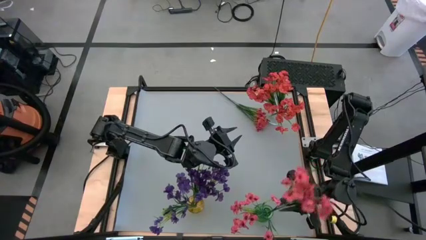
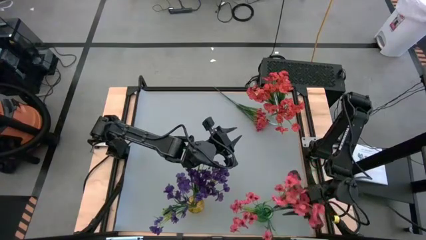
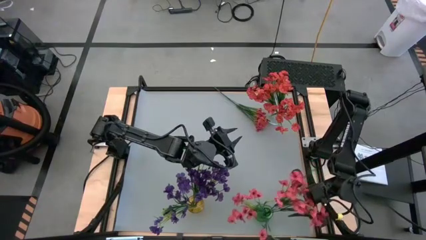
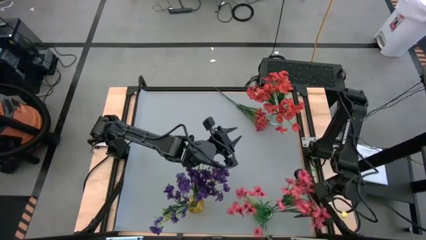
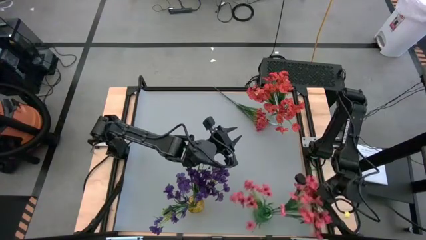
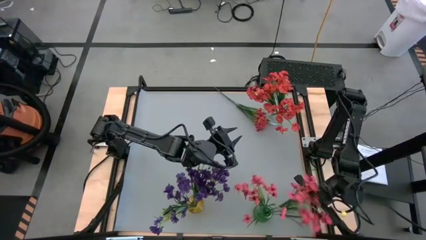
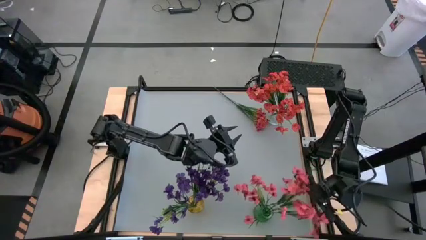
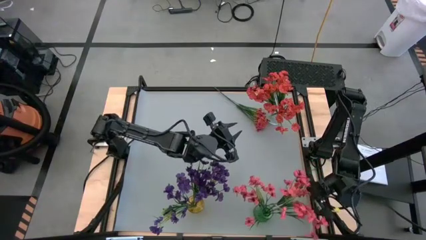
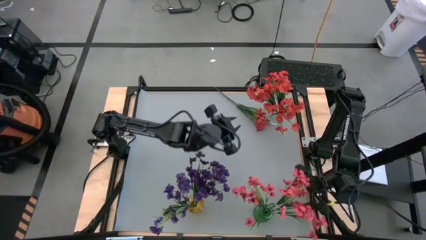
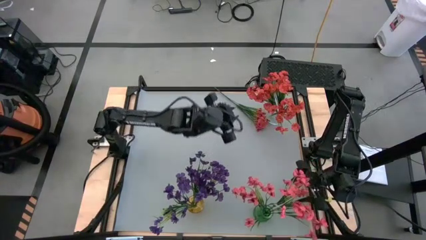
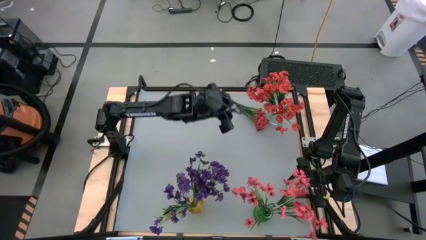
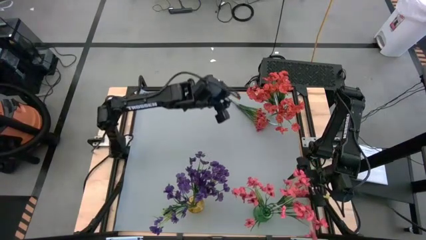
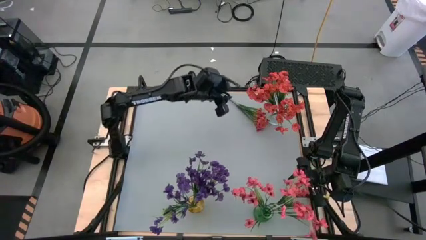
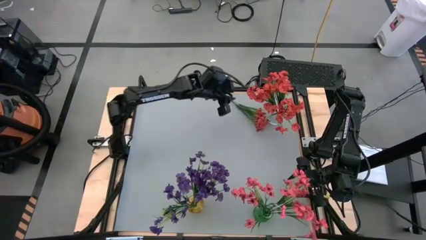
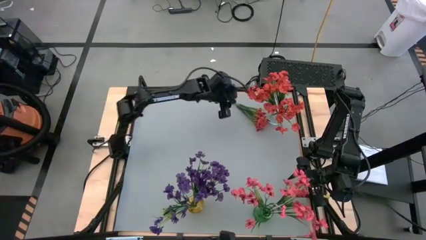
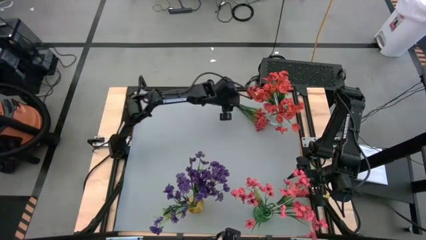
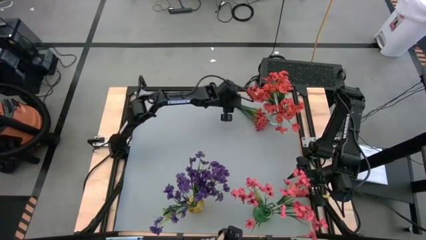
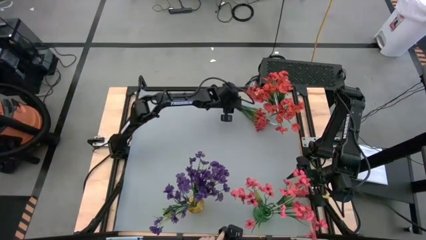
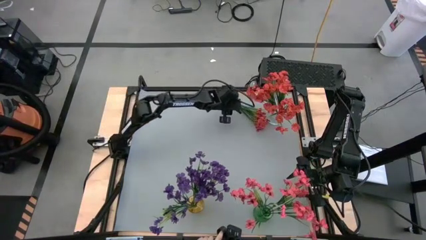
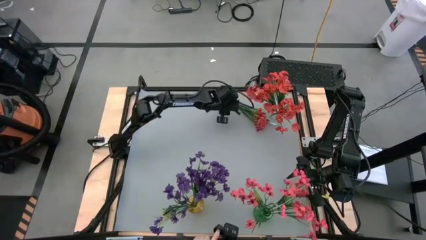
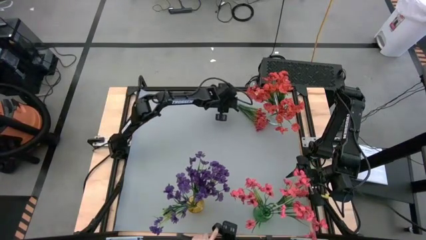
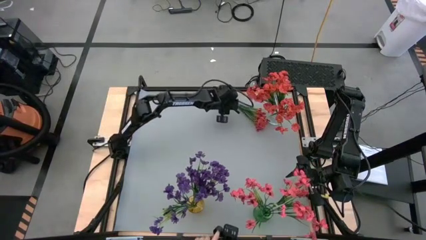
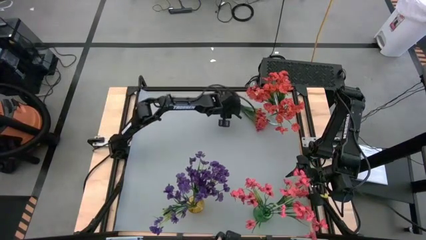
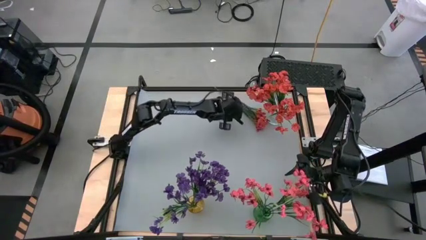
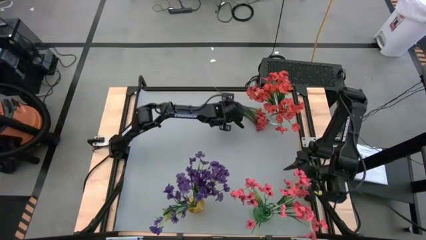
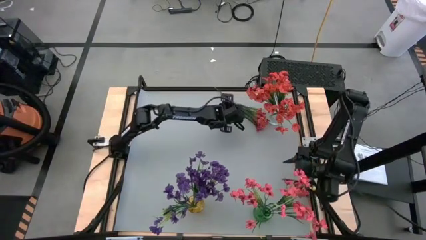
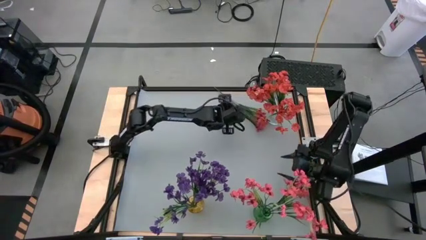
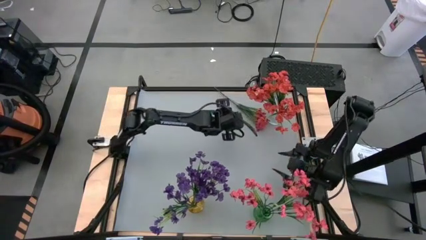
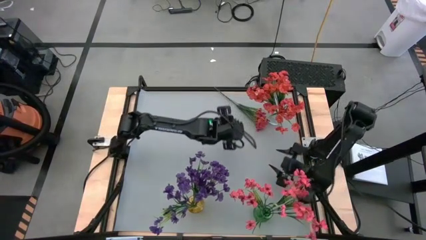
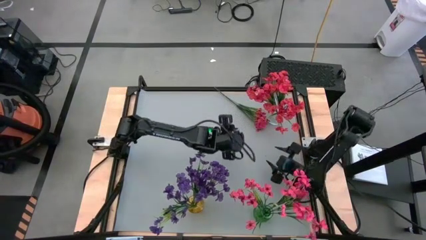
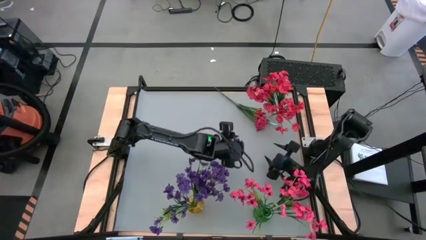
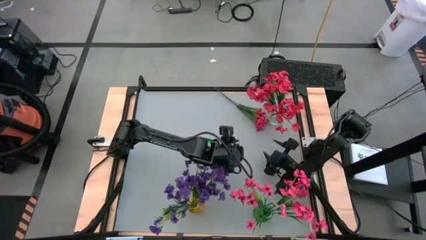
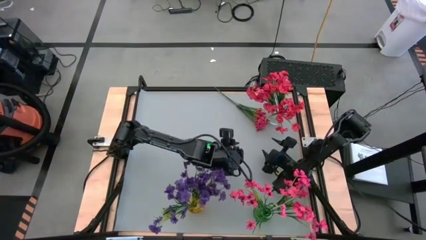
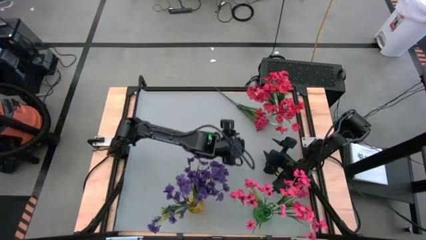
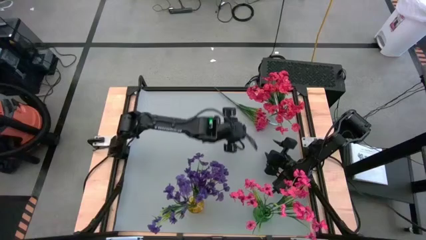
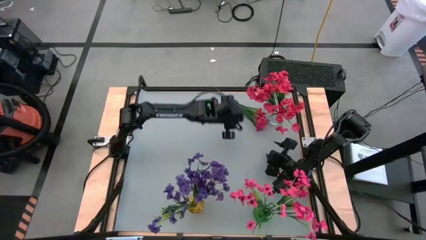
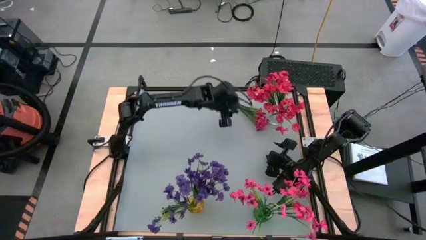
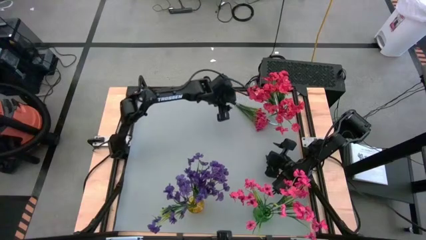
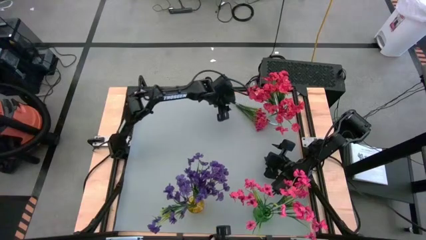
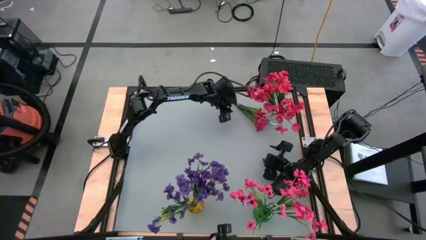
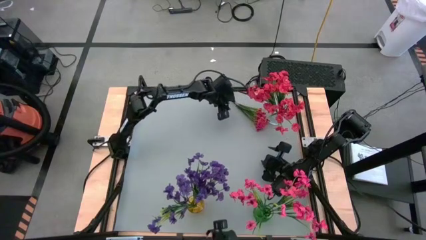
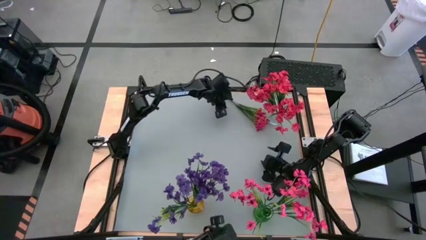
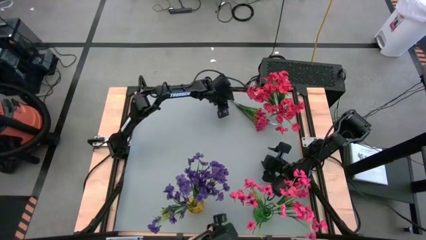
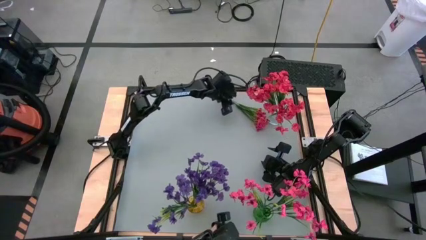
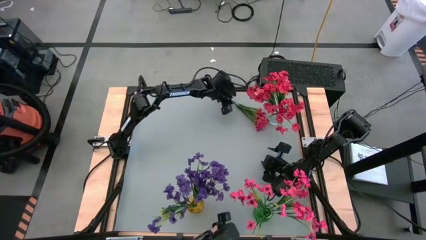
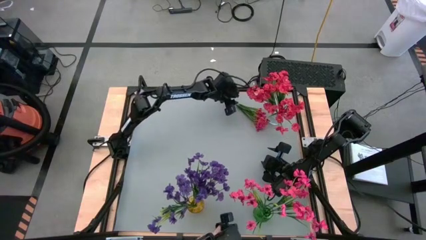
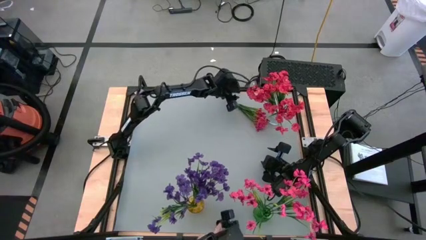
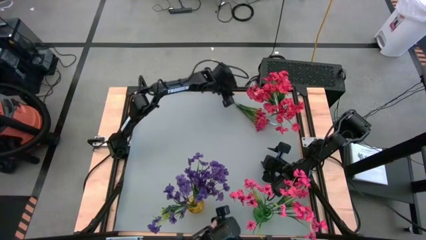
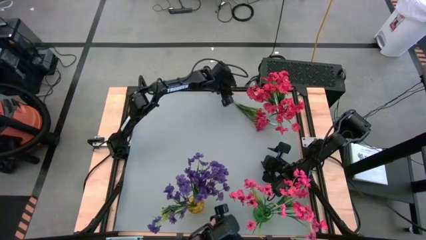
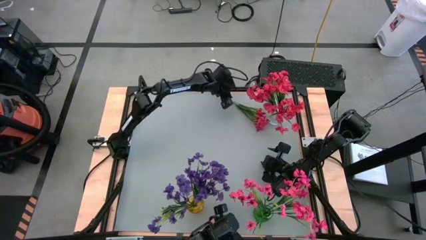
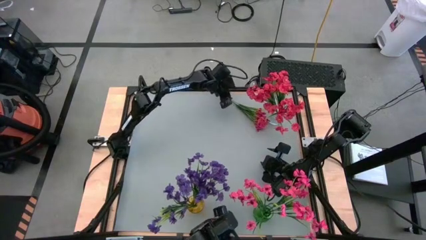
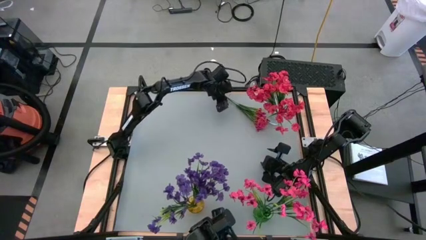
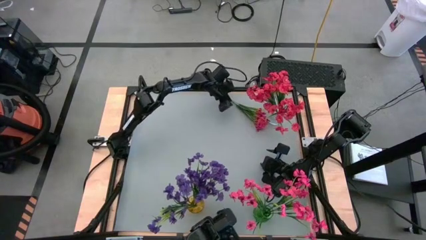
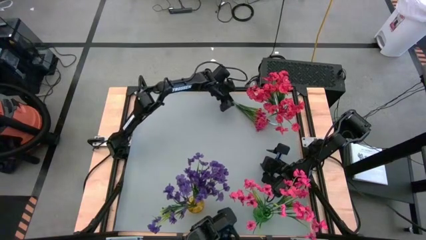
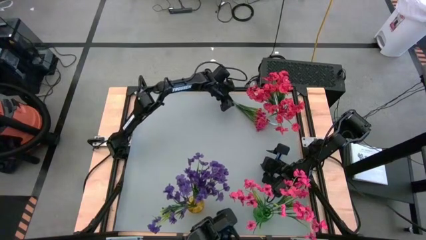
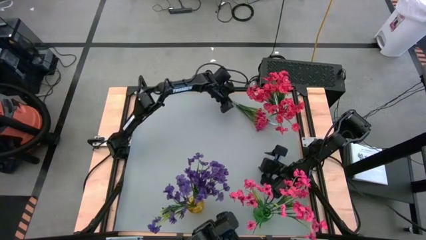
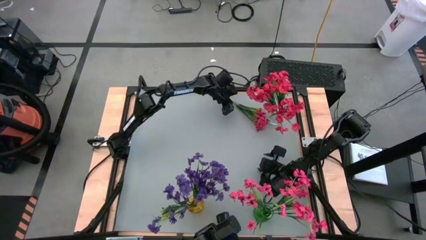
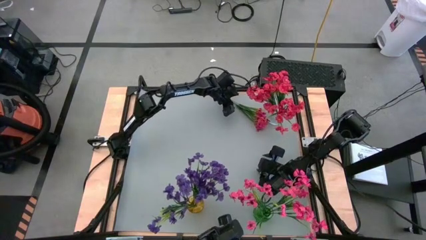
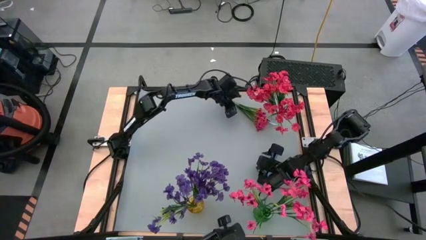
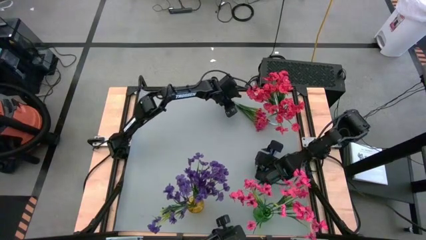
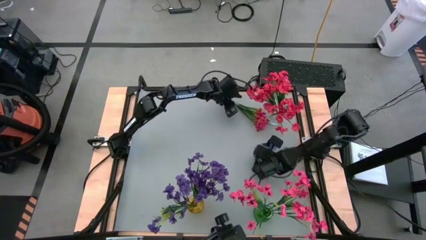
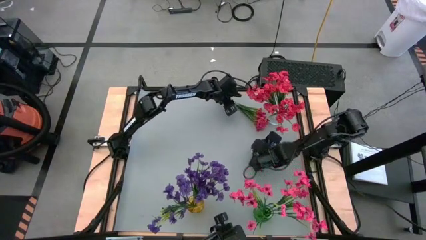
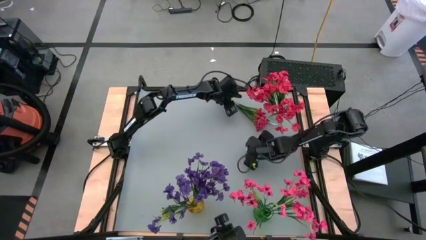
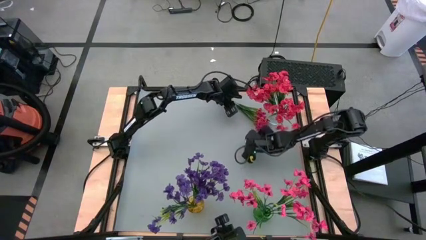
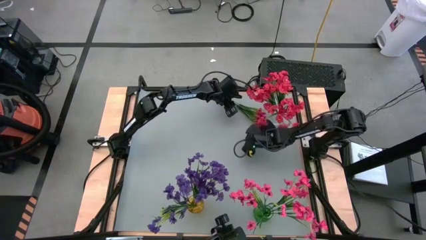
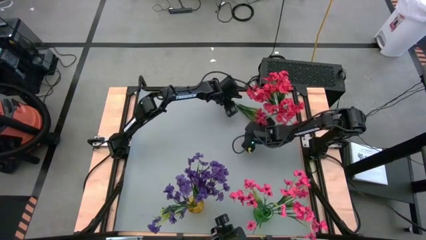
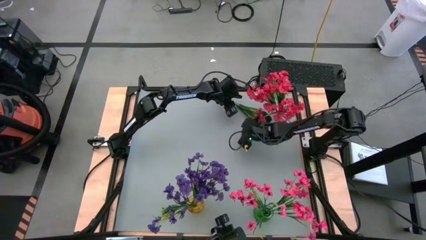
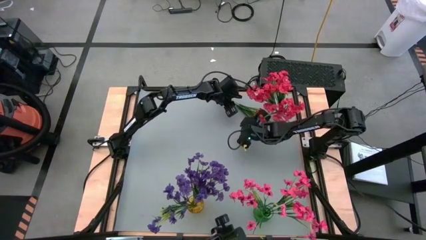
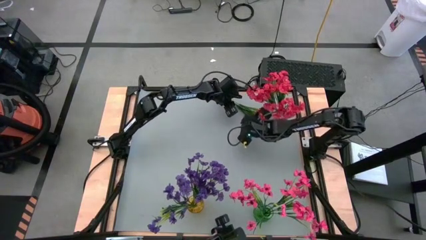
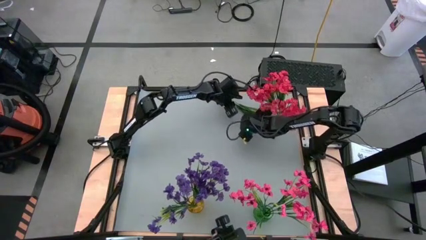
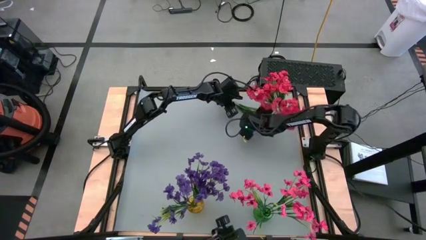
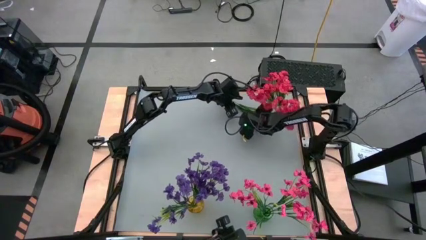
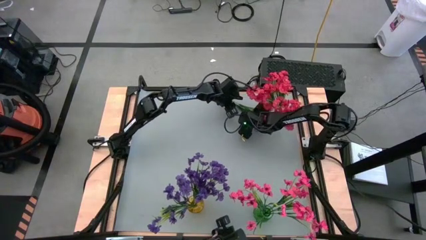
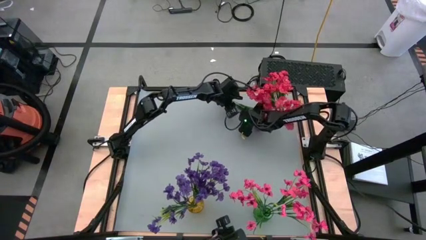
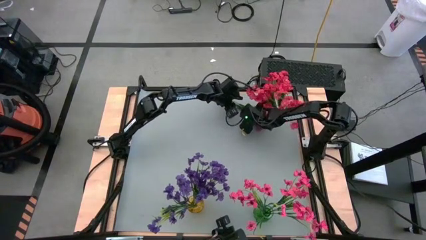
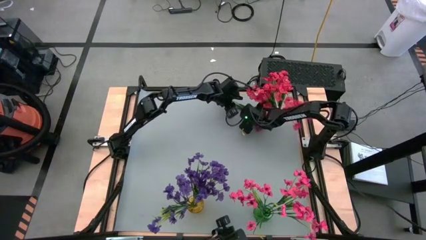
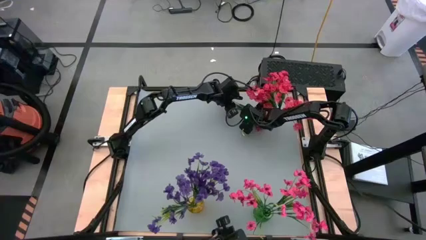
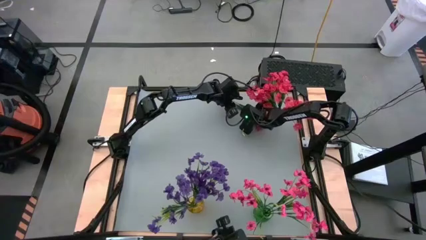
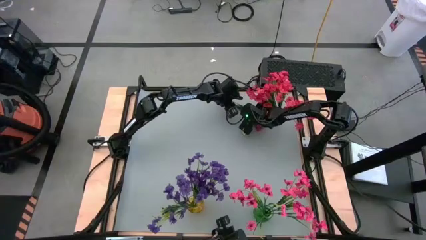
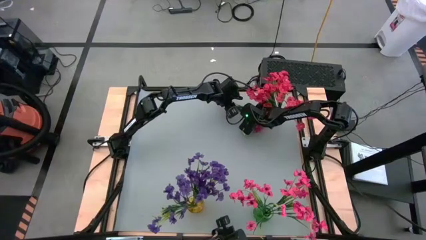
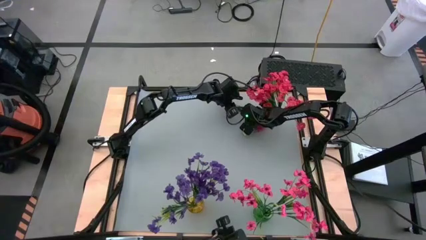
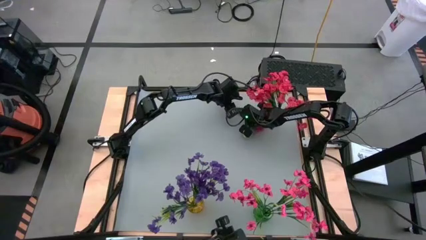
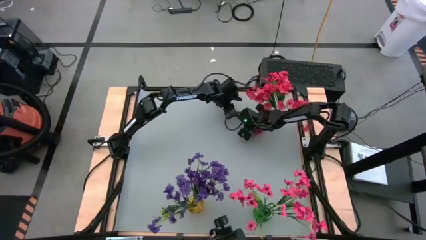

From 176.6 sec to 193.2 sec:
Task: Sort flowers into vase by color
Put the pink flower into the green transparent vase
